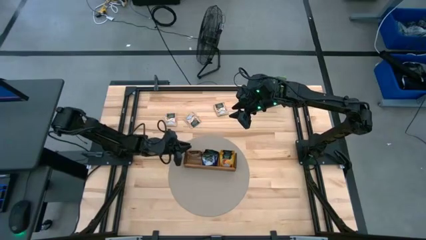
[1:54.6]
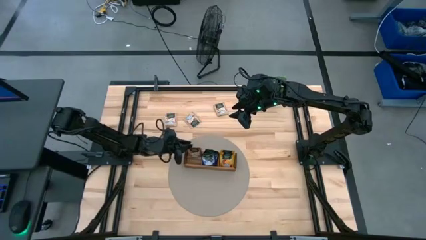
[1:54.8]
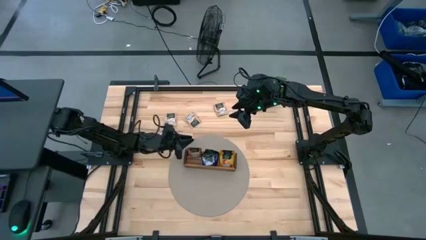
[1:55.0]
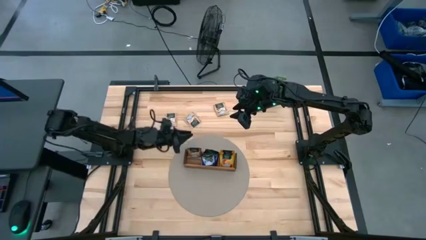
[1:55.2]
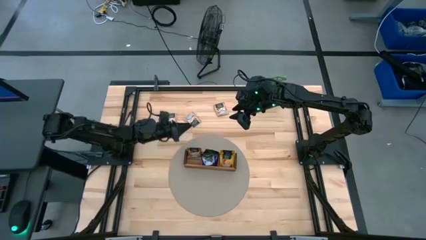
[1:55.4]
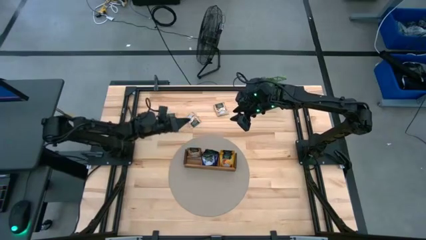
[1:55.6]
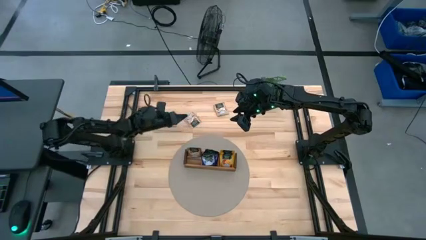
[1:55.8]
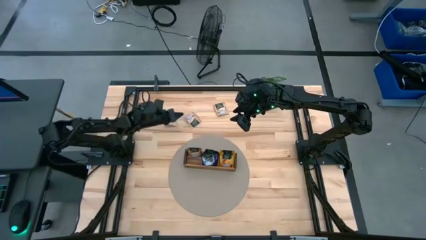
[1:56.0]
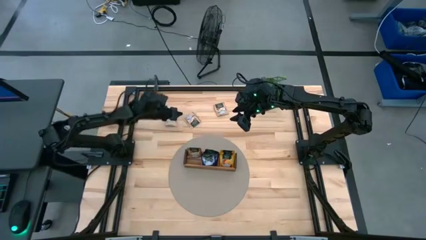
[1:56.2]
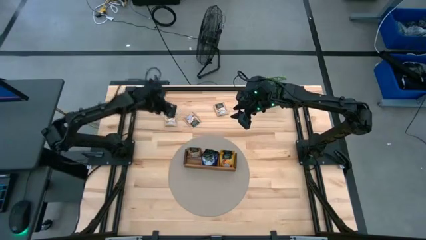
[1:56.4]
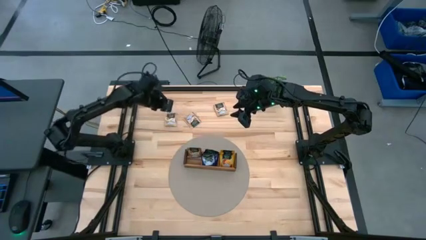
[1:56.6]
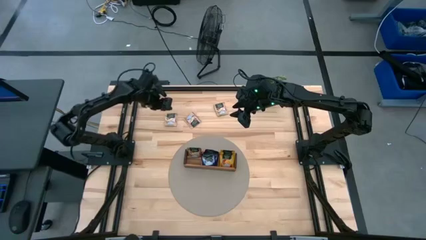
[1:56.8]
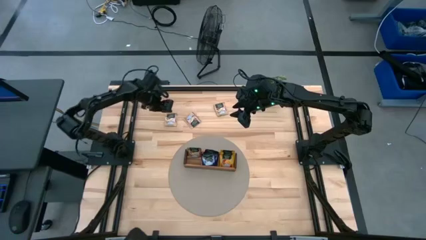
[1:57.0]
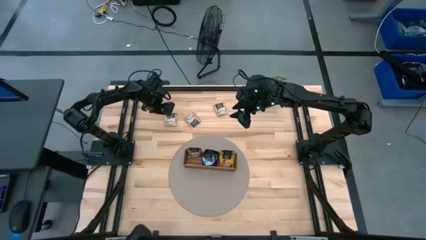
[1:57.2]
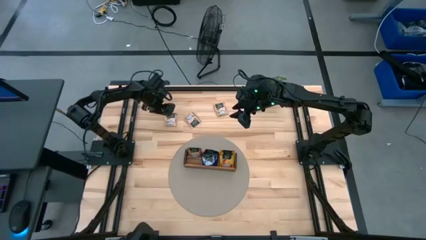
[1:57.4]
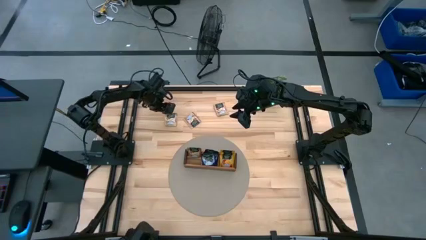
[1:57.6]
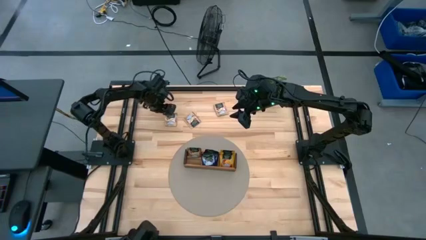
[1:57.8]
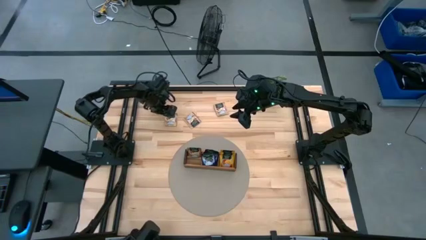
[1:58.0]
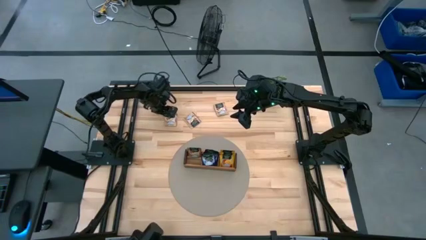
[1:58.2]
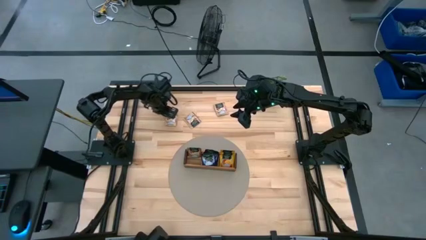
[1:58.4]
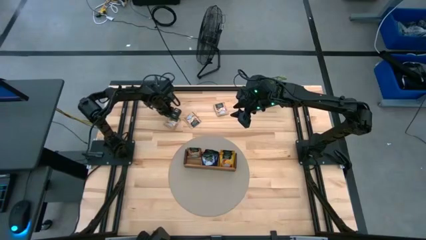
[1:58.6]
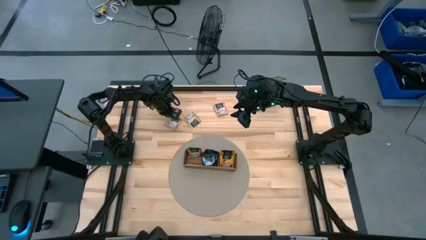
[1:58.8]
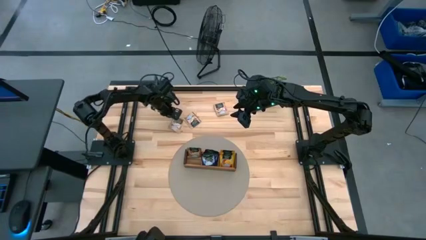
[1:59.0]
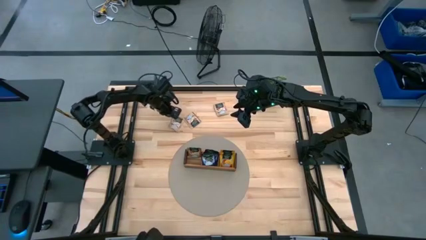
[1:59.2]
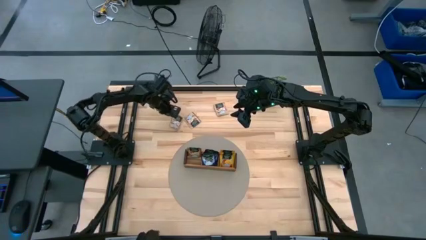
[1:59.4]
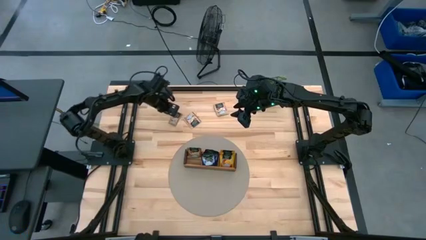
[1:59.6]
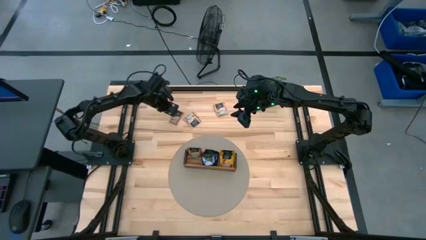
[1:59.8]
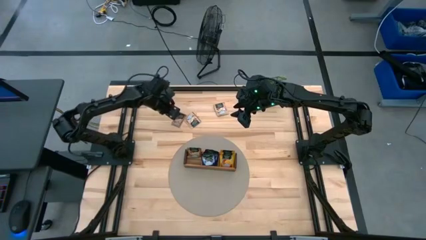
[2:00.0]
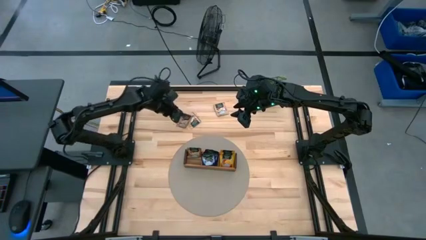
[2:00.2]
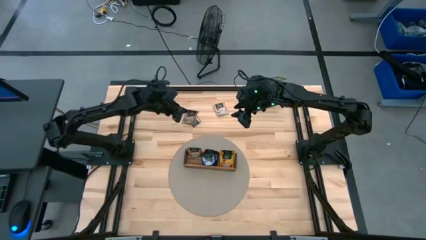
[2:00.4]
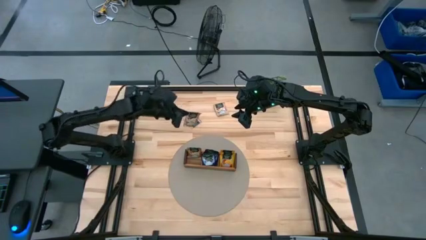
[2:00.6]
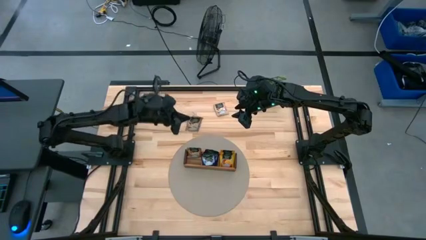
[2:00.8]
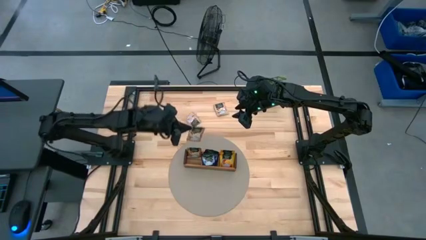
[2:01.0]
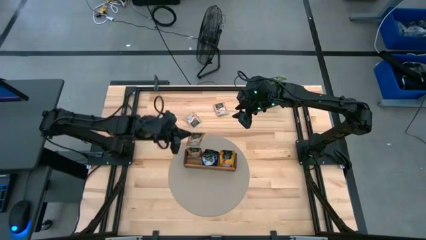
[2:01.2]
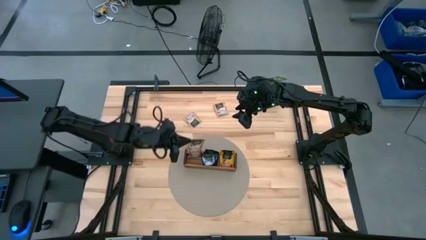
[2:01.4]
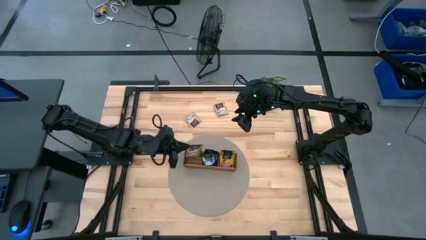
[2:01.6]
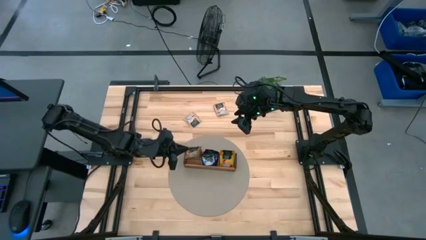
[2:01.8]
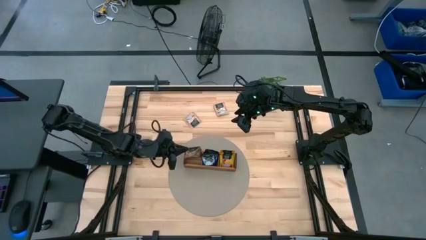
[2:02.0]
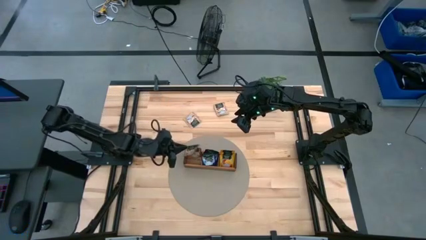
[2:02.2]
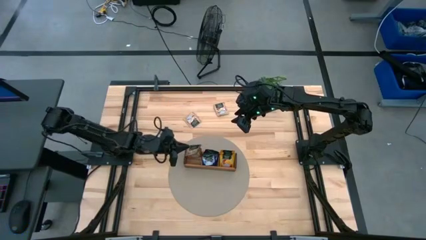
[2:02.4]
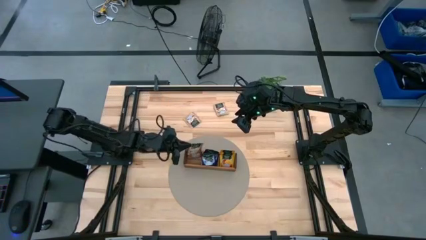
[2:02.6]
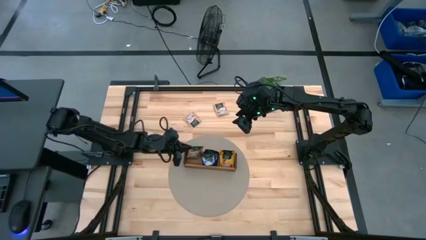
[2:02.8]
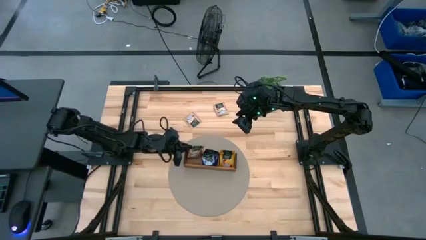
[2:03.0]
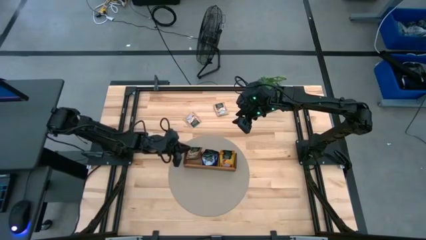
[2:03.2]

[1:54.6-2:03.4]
Task: Pick & Place Tea
Put the brown tea bag into the left section of the wooden organizer

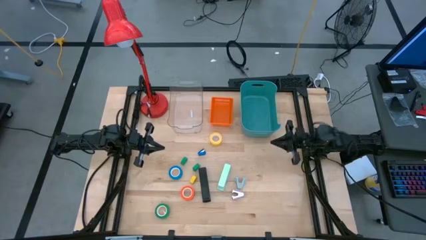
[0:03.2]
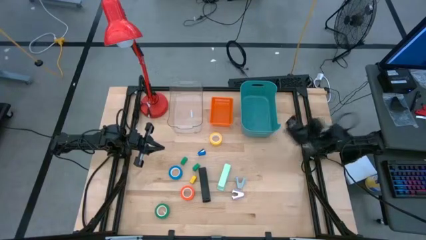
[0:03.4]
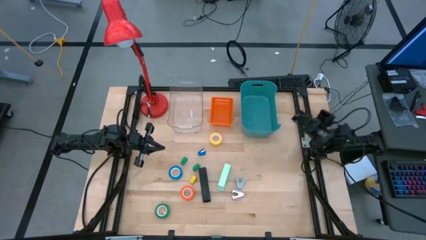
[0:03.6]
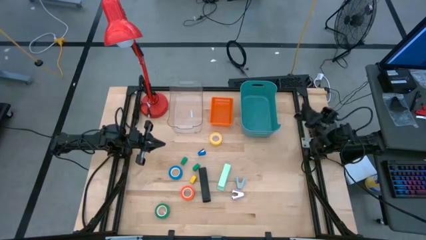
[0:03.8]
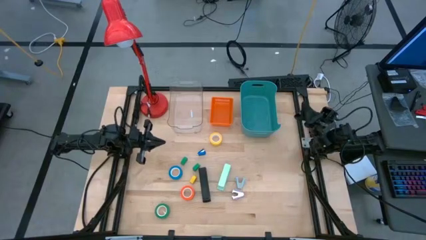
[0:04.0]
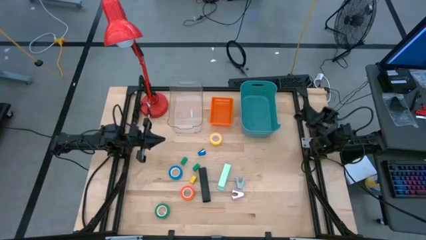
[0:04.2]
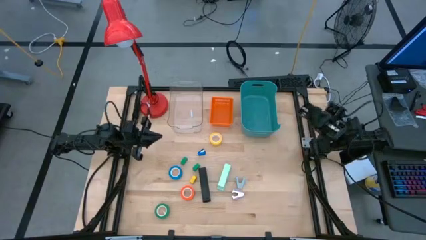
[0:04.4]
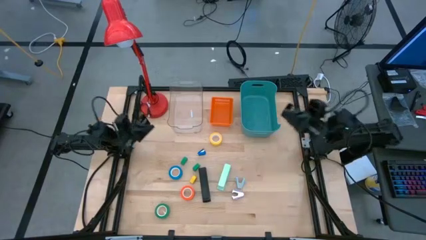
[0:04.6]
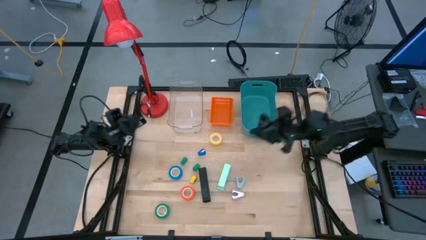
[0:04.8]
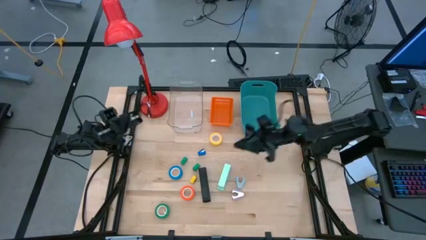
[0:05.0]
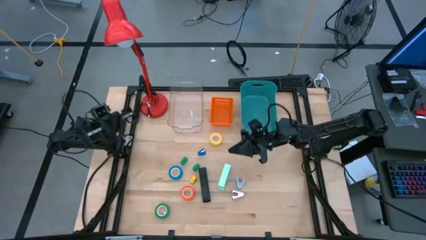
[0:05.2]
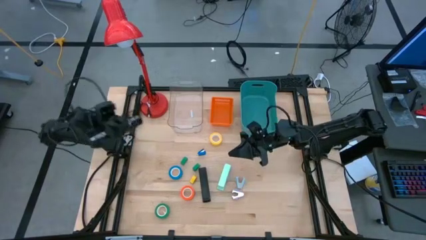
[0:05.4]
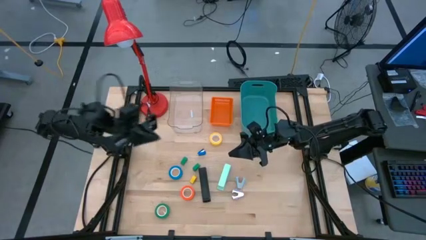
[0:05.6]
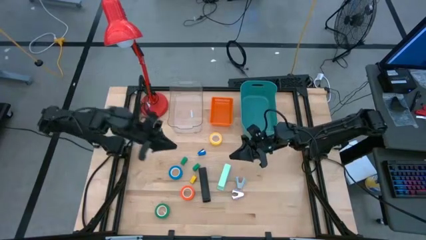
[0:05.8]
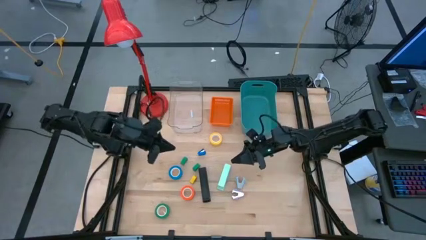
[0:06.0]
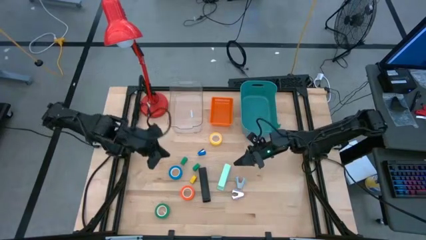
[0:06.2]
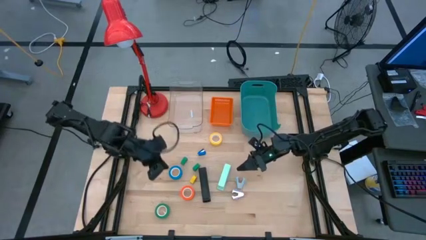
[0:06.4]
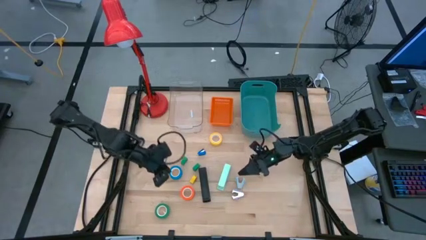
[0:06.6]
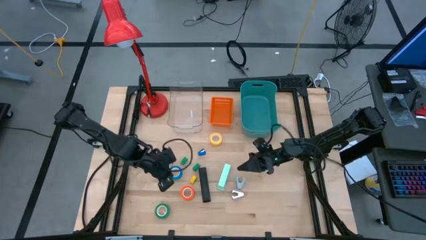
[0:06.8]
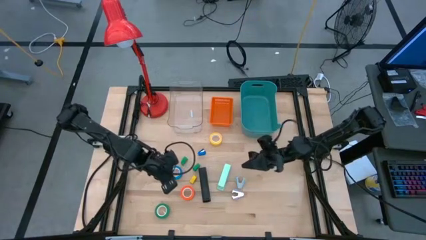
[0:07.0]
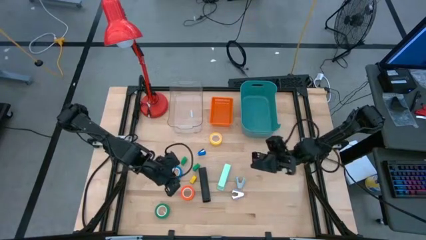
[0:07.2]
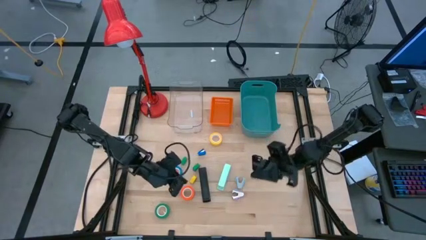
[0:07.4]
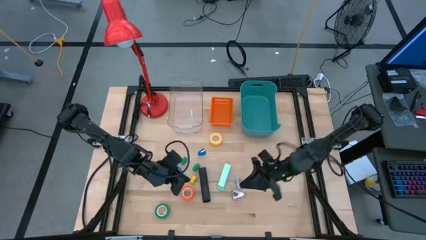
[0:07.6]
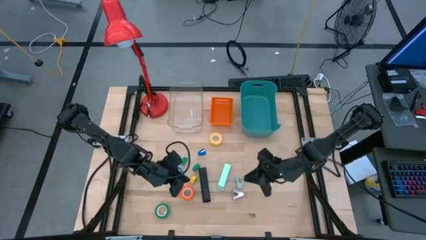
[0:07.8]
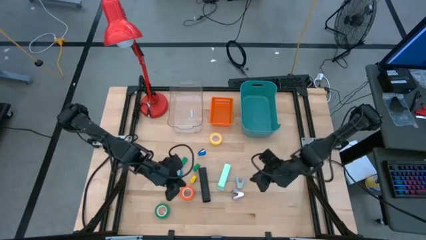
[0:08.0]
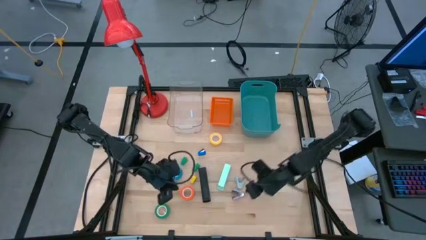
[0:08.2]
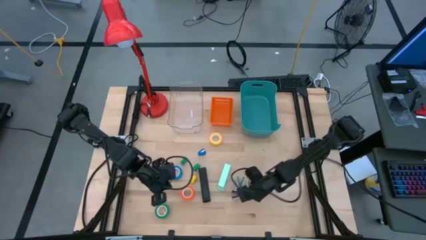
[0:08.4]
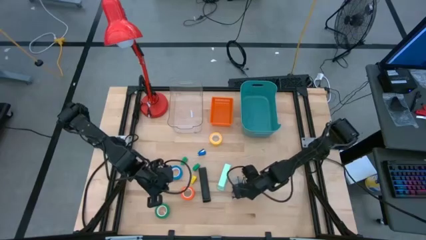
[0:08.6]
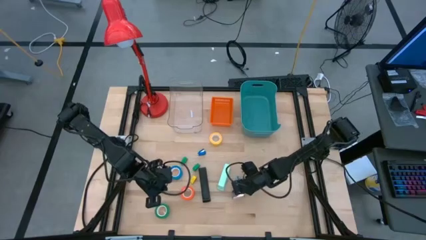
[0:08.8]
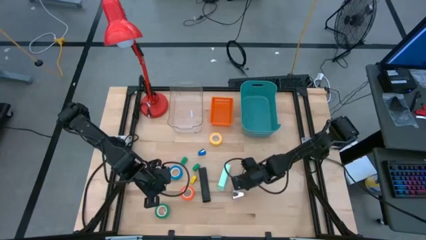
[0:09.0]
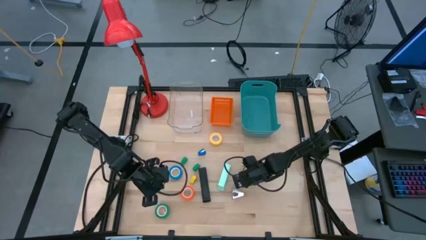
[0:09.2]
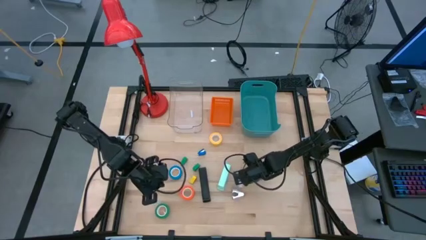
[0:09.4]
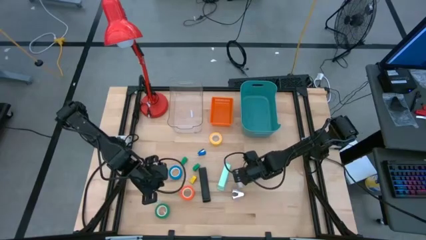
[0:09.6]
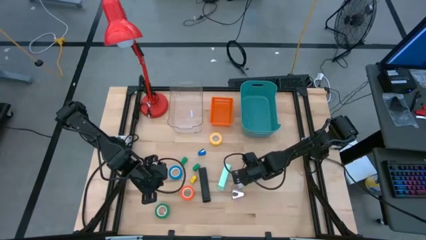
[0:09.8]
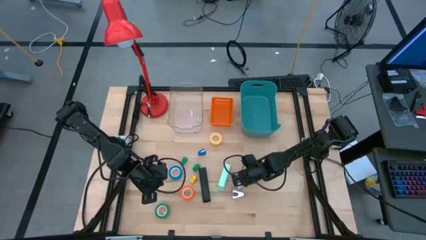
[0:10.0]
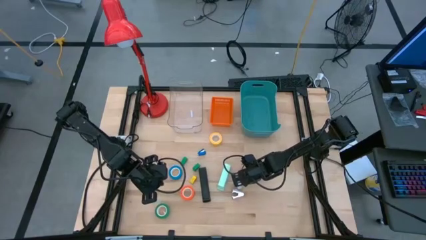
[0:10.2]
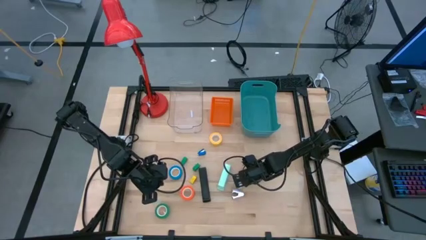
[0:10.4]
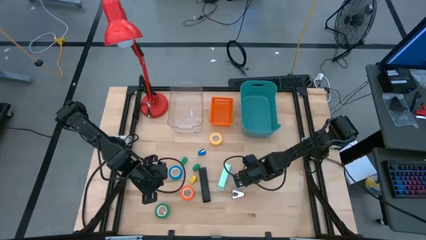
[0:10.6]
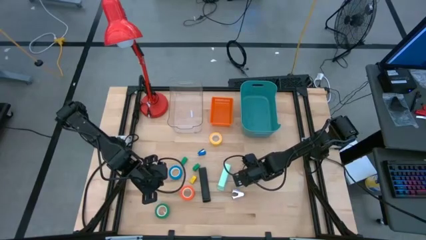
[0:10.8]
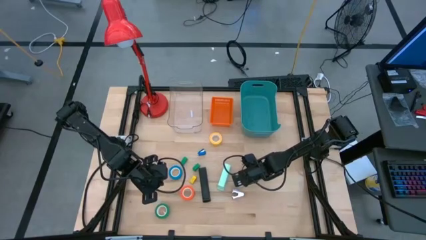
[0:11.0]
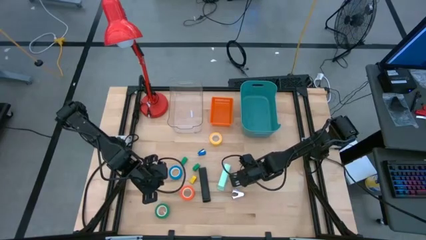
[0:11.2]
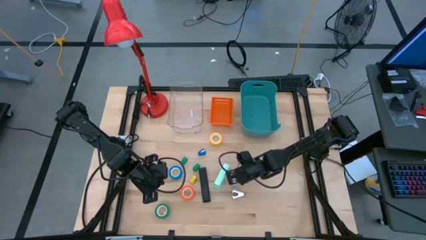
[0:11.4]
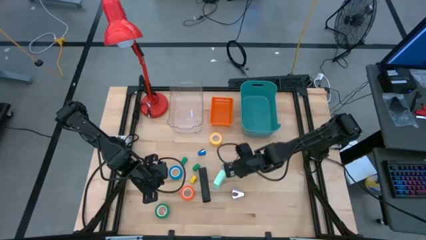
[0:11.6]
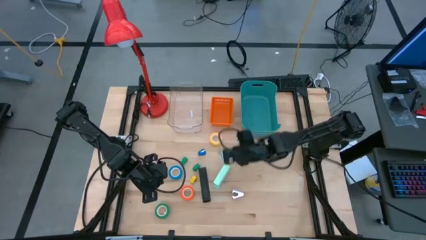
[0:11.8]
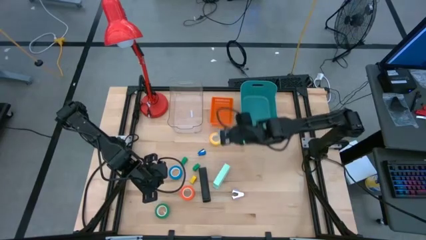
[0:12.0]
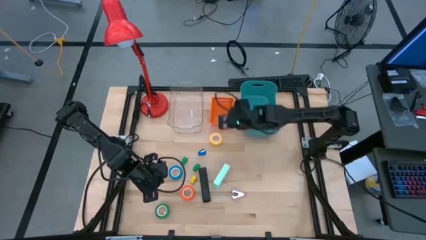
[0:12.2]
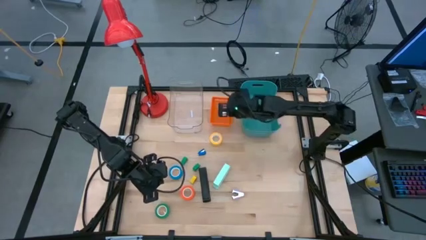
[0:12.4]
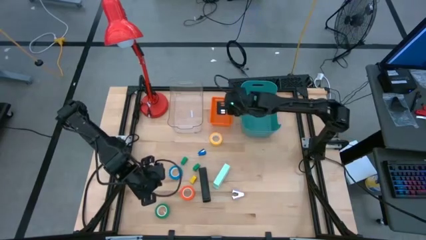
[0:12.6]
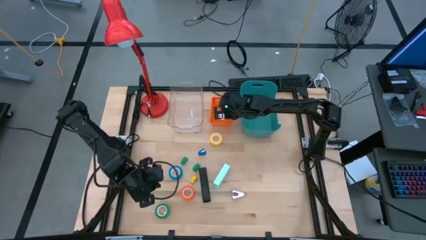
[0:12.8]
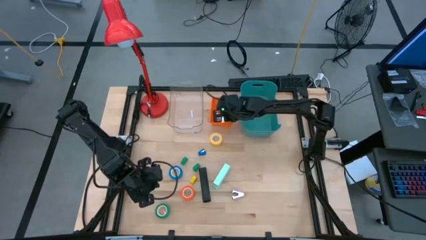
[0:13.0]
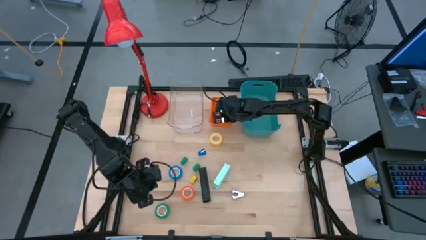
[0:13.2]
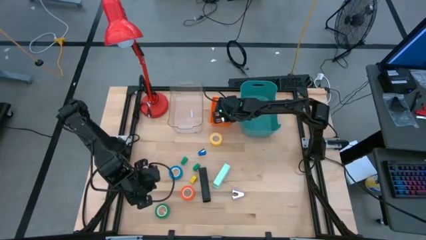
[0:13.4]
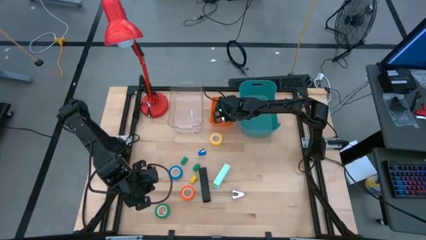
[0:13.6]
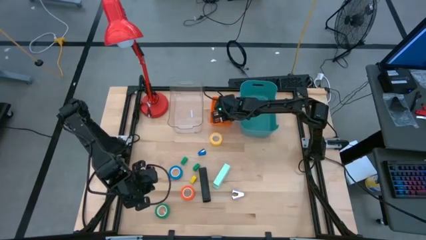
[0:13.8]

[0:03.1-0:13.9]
Task: Pick and place Stapler, Stapler remover, tape
Put the light blue staple remover into the orange bin
